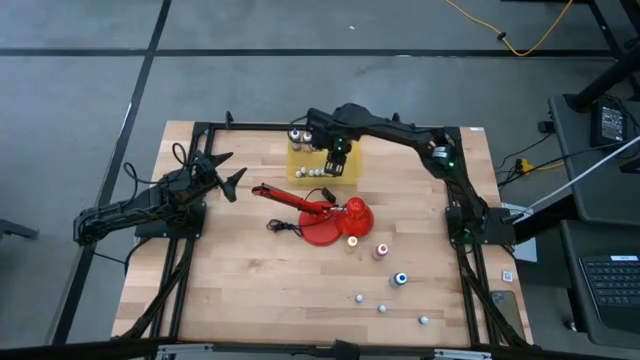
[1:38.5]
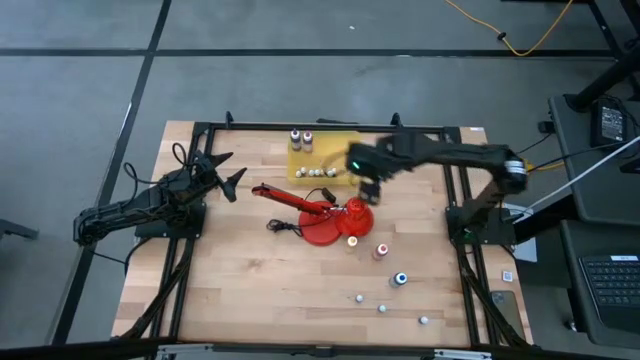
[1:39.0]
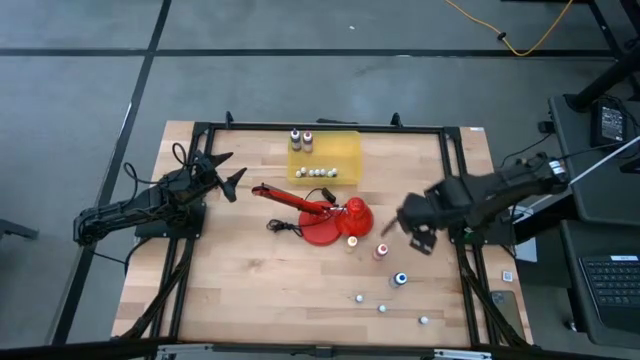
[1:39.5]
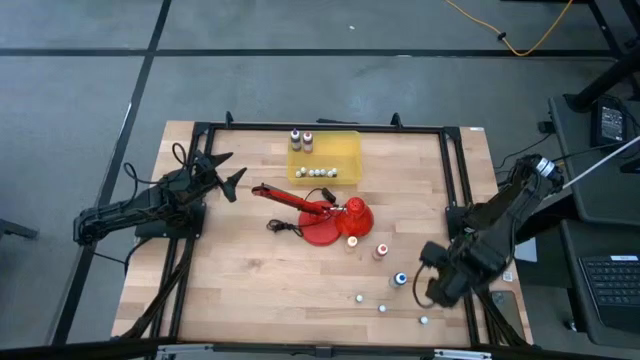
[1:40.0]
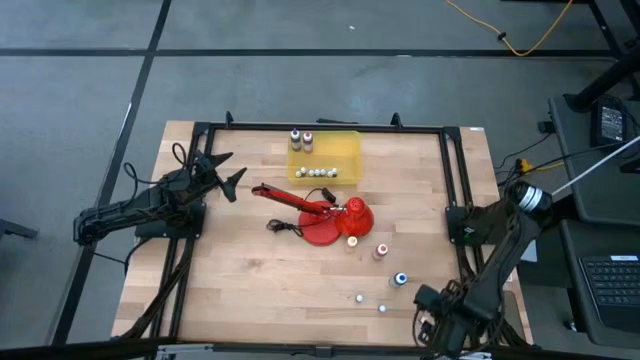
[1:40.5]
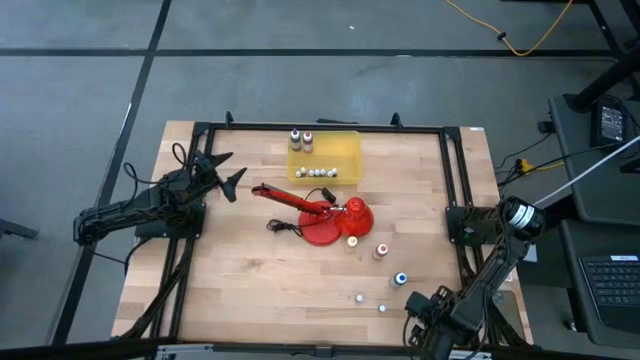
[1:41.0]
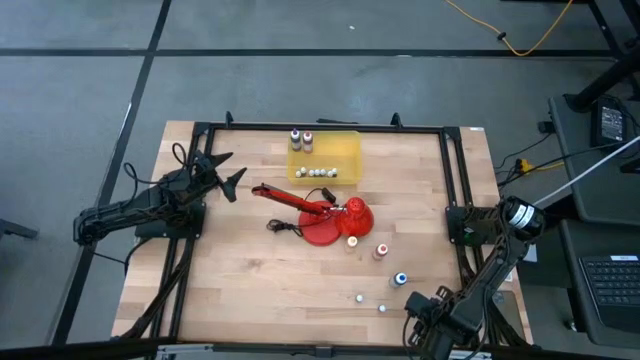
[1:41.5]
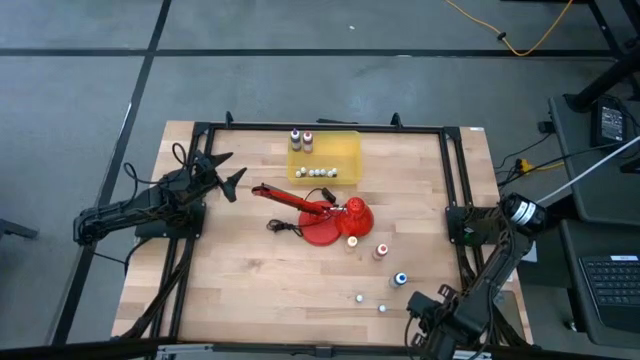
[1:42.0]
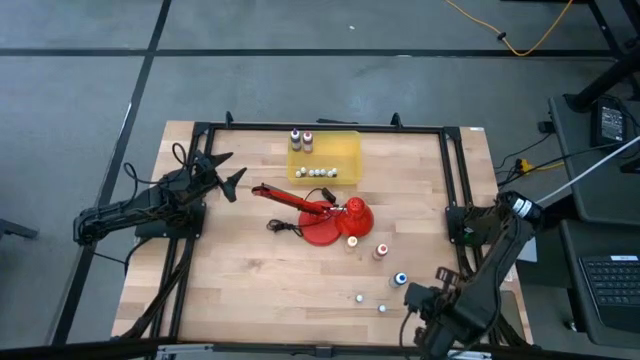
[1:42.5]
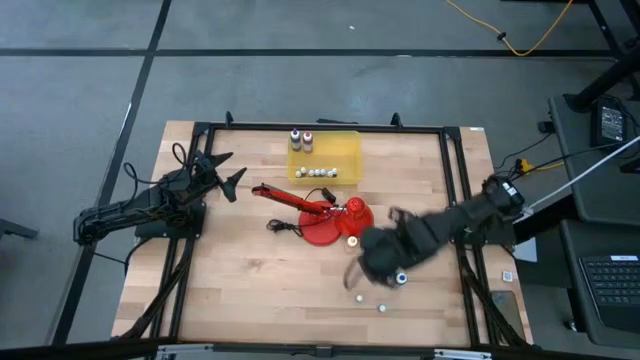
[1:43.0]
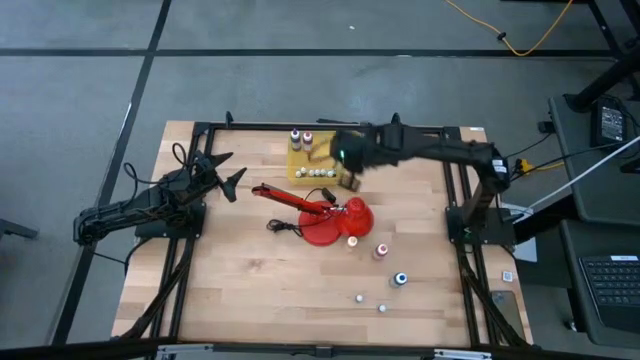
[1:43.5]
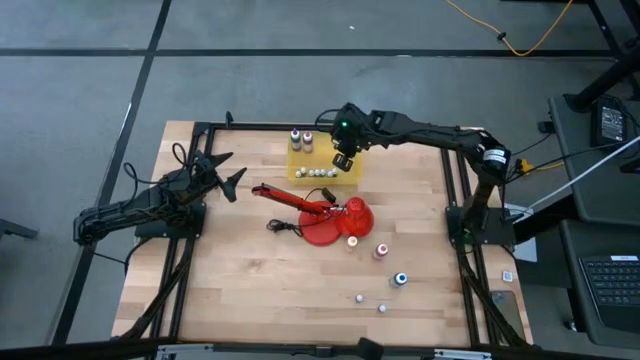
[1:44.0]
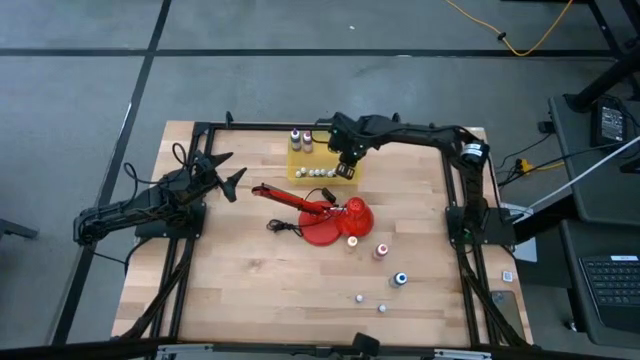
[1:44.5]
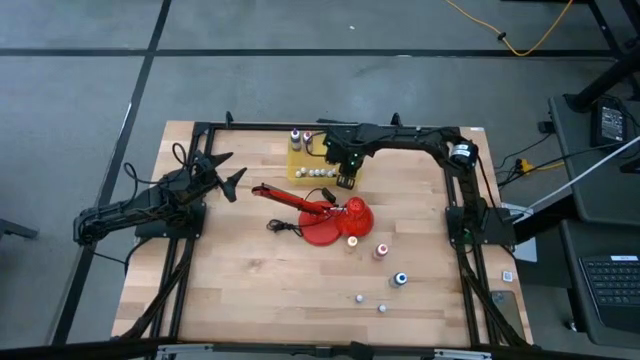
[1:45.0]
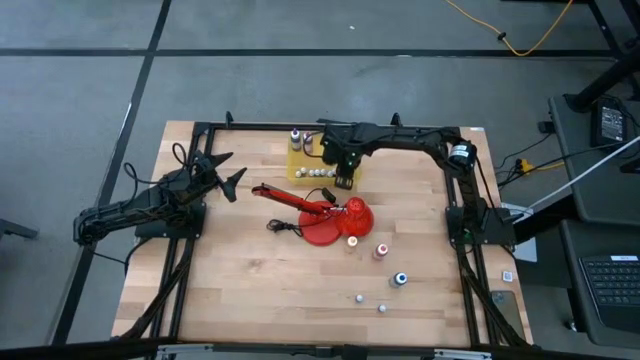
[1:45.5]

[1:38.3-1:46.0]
Task: Pick & Place food coloring
Put the black food coloring bottle into the yellow bin

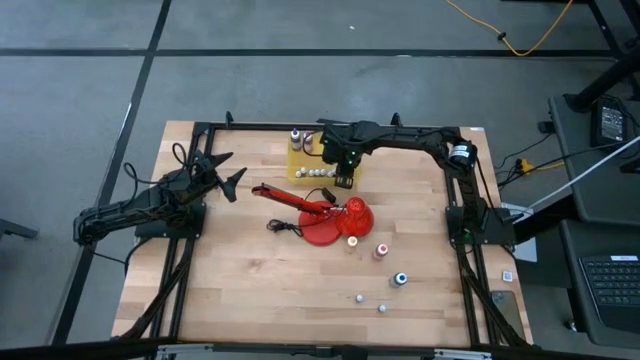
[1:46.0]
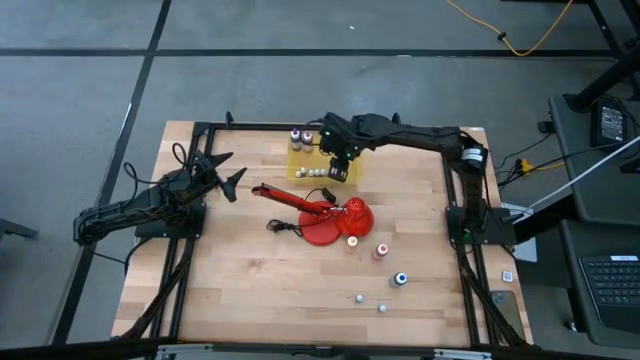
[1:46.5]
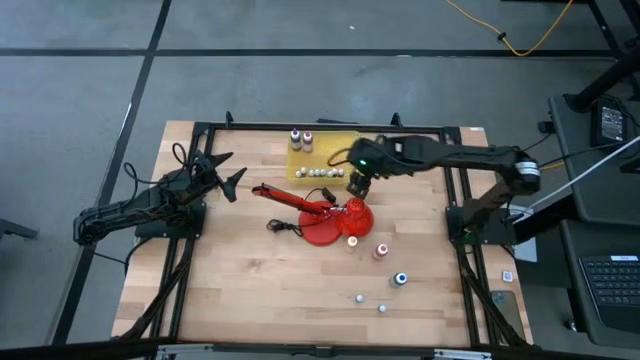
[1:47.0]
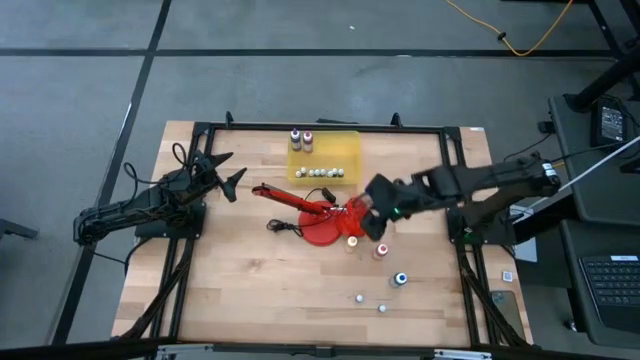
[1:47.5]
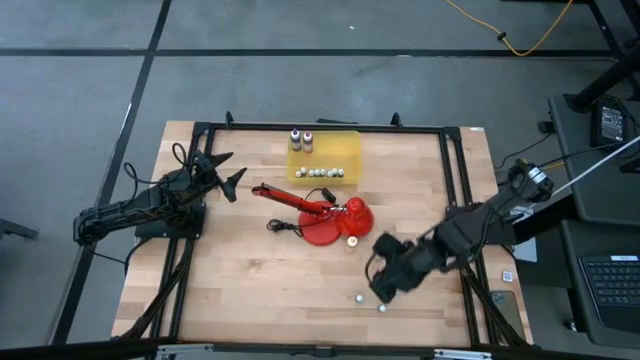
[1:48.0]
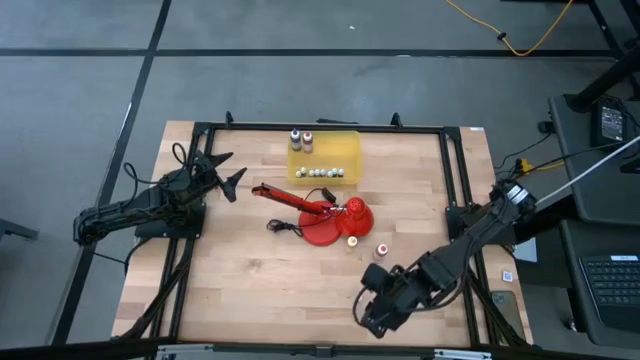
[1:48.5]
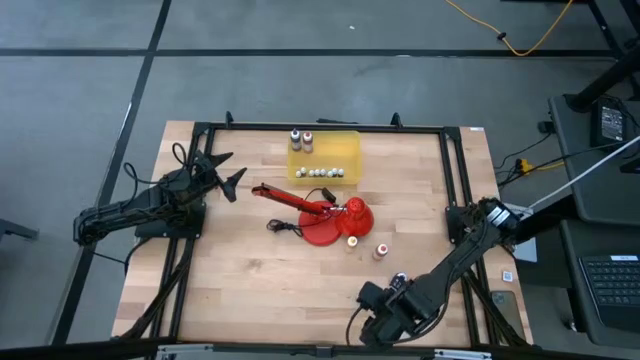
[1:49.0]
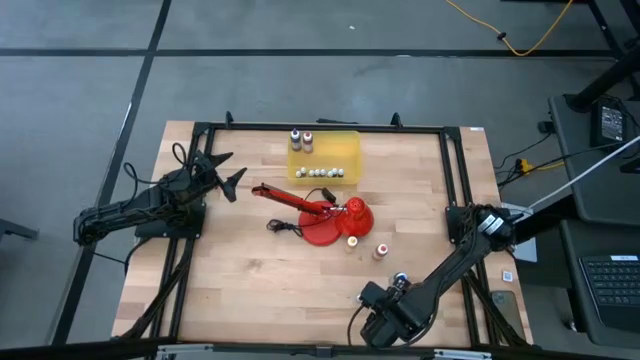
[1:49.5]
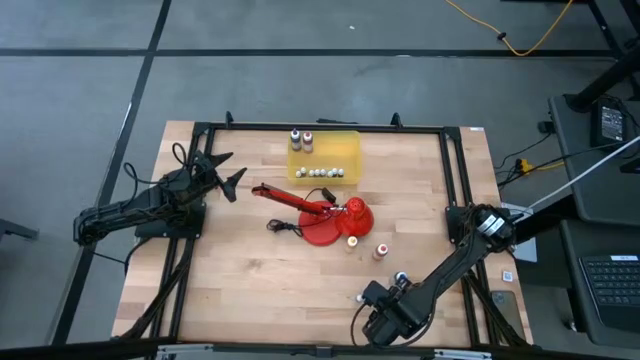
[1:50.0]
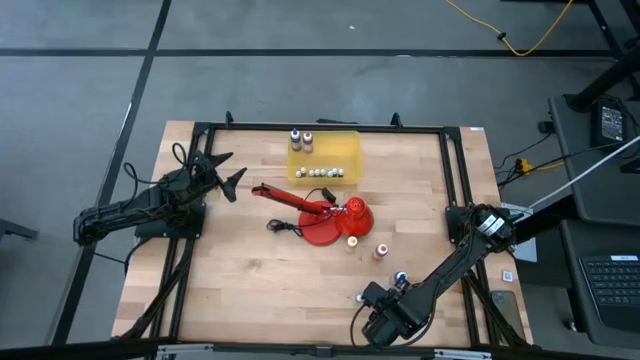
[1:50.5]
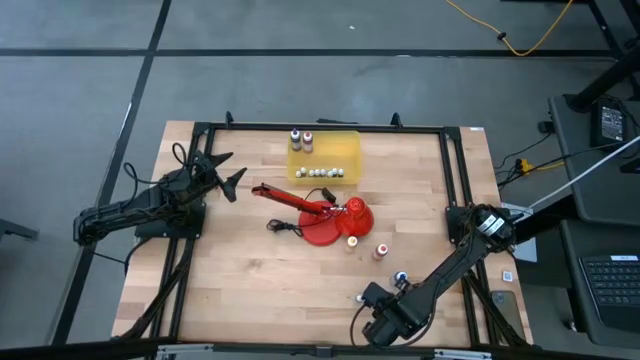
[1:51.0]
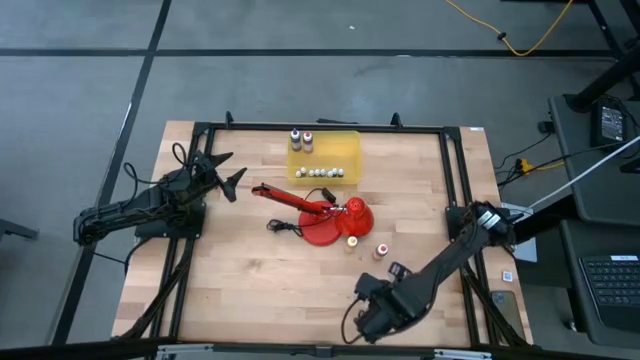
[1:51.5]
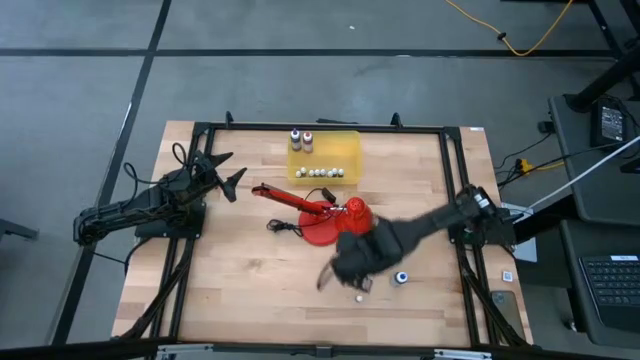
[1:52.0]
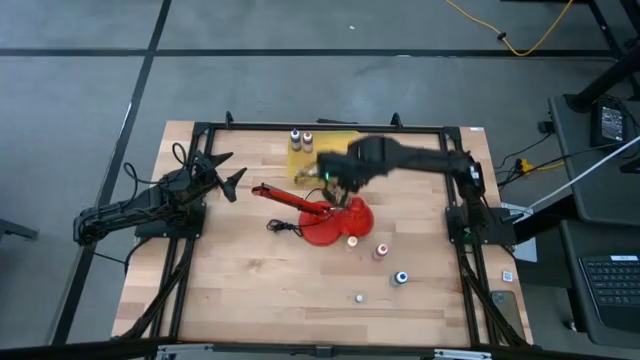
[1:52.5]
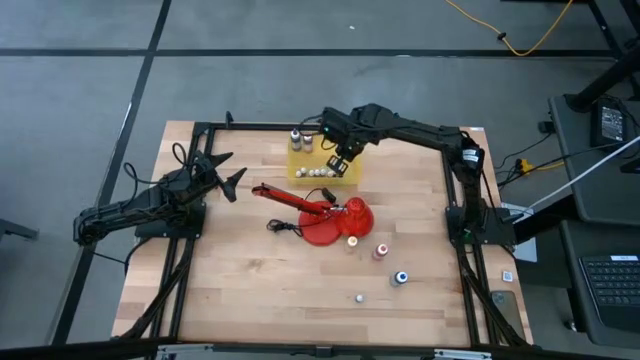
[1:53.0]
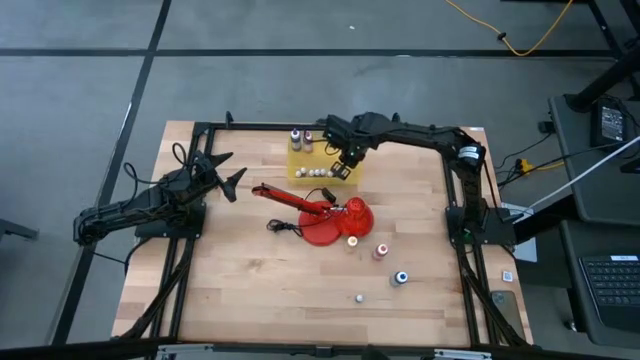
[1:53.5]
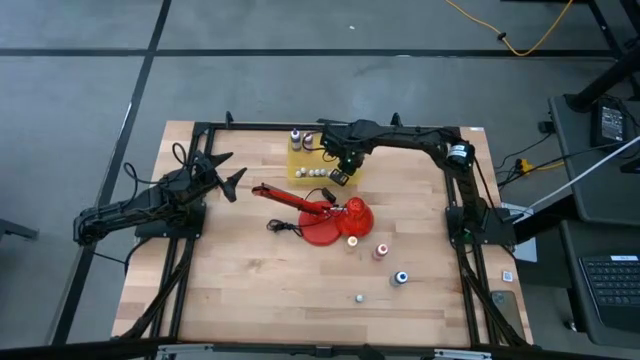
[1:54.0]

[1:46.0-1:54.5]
Put the black food coloring bottle into the yellow bin

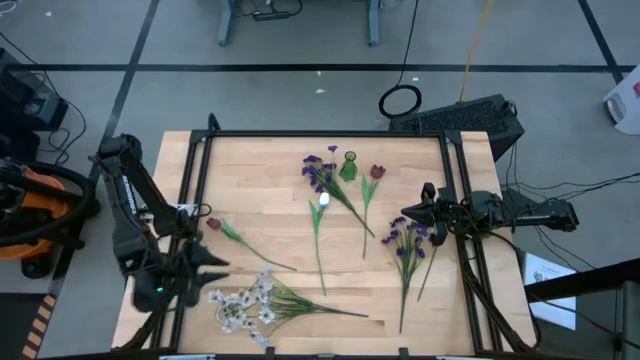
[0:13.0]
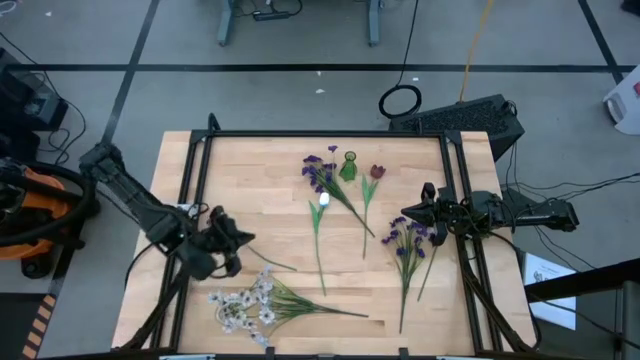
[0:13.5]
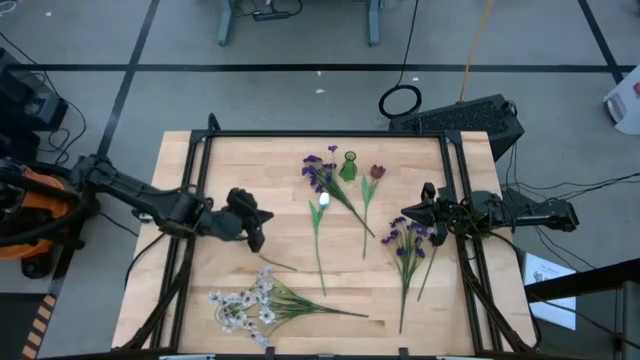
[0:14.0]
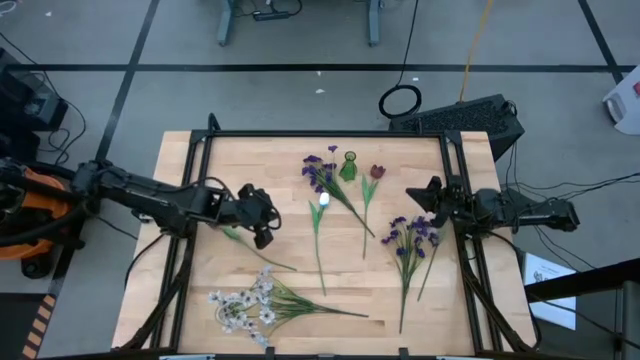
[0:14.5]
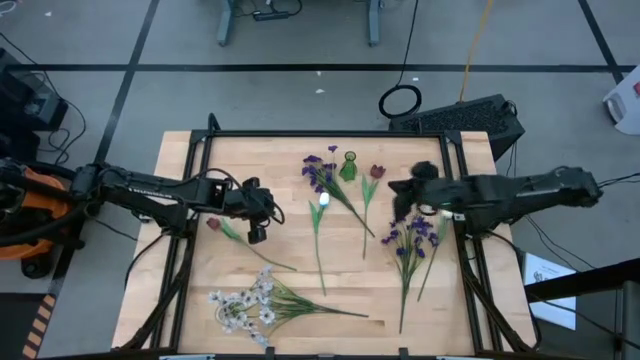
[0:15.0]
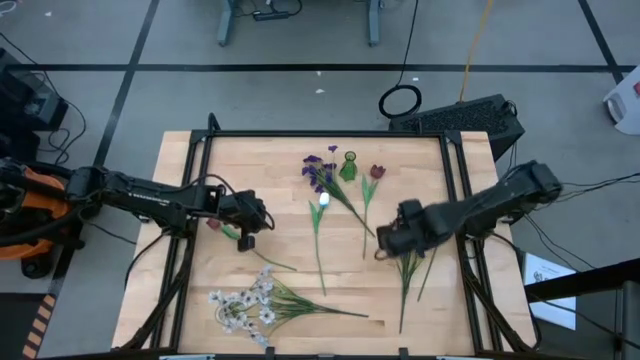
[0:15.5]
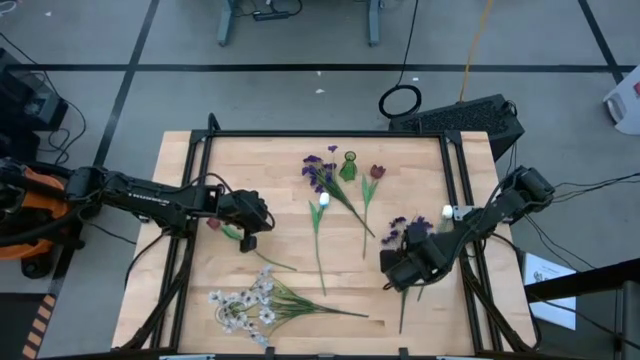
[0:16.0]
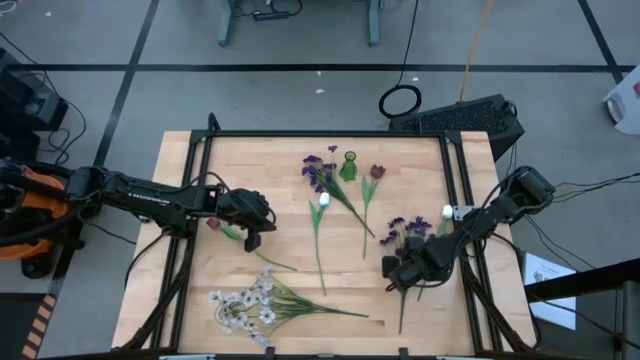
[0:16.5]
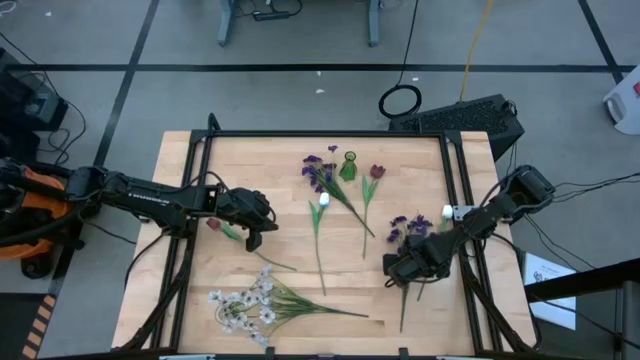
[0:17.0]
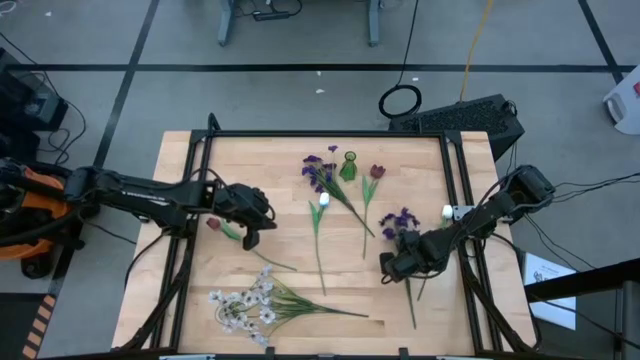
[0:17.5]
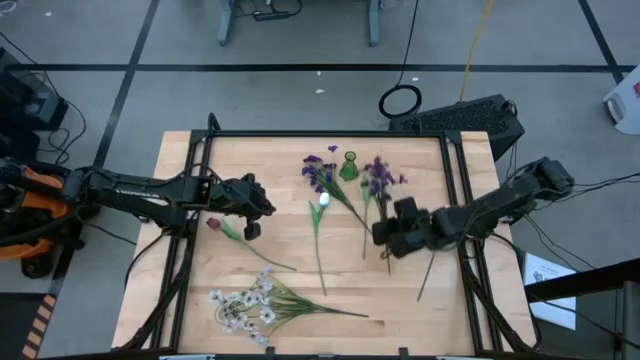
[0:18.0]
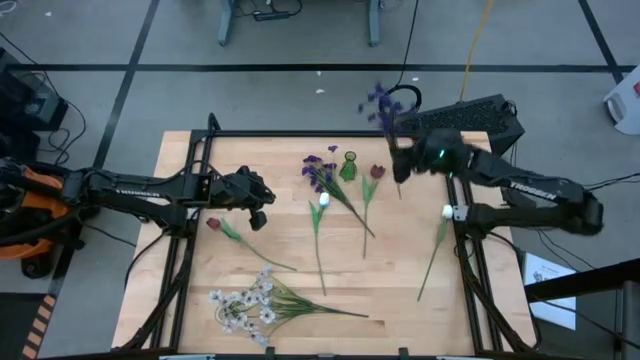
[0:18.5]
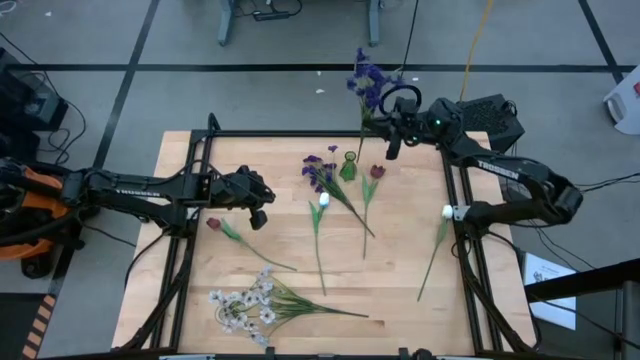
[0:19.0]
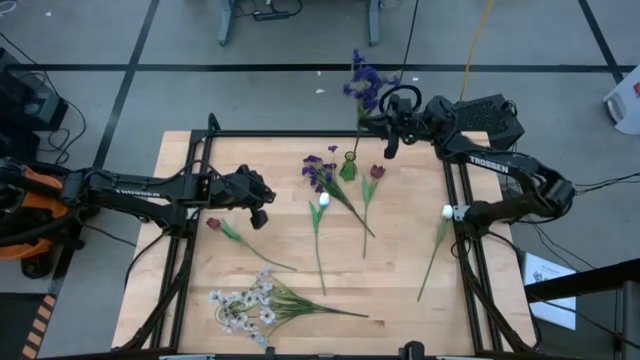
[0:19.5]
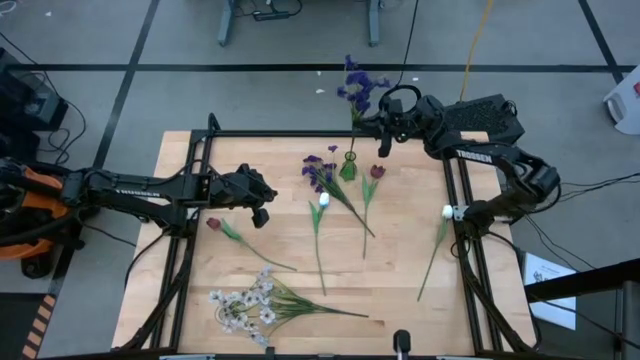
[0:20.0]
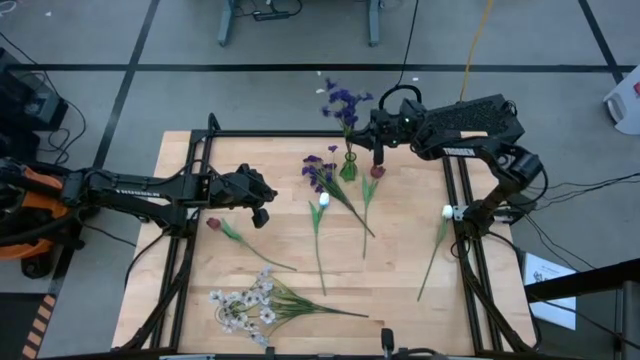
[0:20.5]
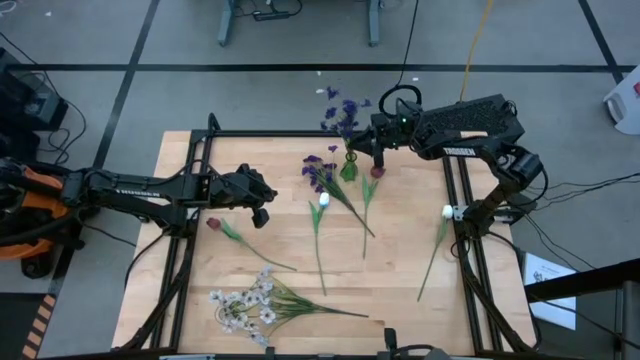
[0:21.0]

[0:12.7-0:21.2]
Task: Sort flowers into vase by color
Put the bottom violet flowers into the green flower vase
